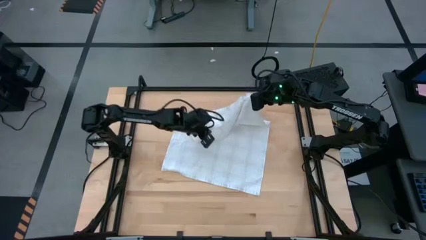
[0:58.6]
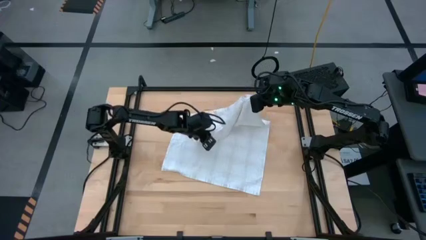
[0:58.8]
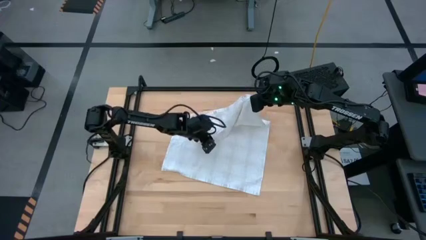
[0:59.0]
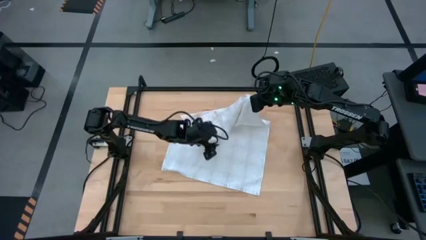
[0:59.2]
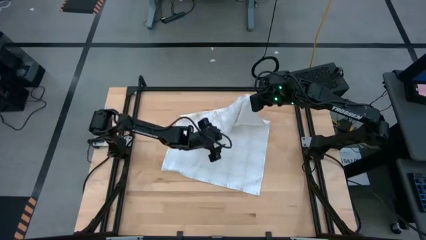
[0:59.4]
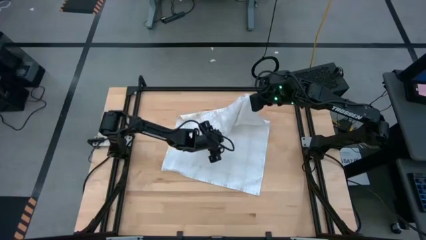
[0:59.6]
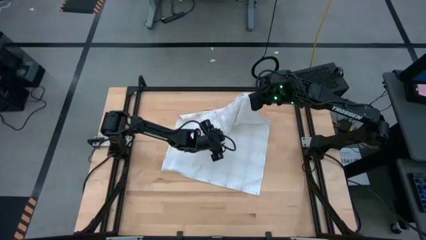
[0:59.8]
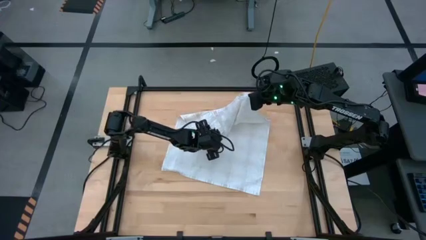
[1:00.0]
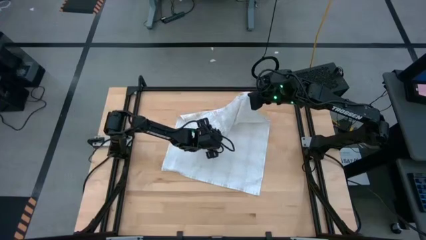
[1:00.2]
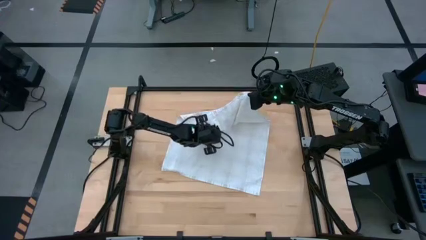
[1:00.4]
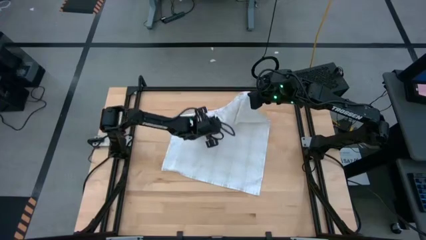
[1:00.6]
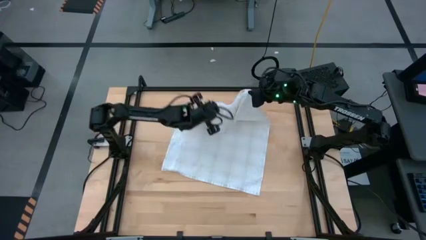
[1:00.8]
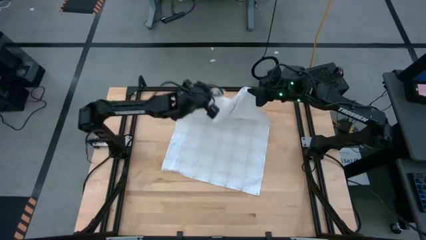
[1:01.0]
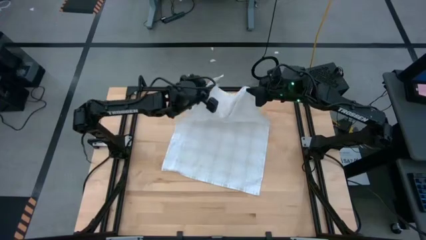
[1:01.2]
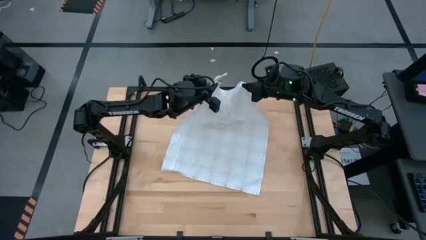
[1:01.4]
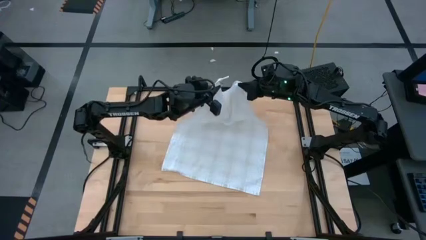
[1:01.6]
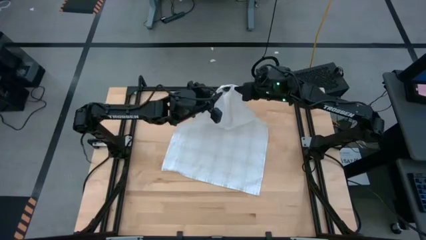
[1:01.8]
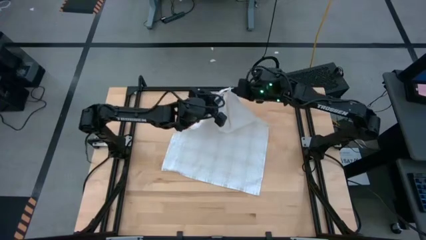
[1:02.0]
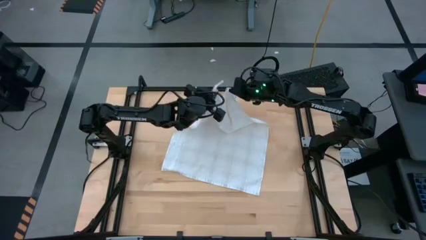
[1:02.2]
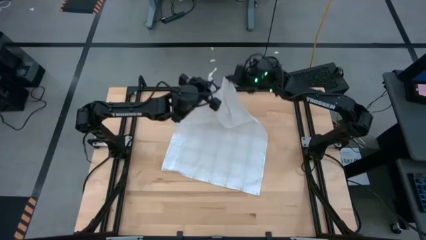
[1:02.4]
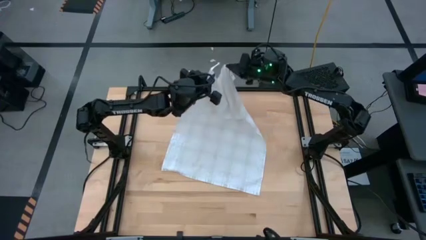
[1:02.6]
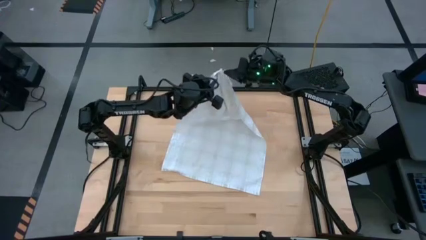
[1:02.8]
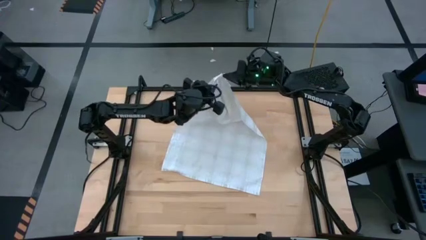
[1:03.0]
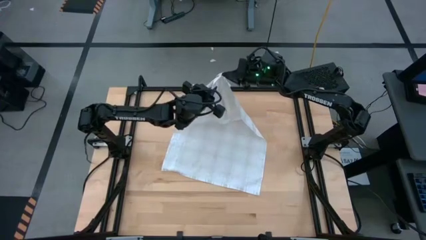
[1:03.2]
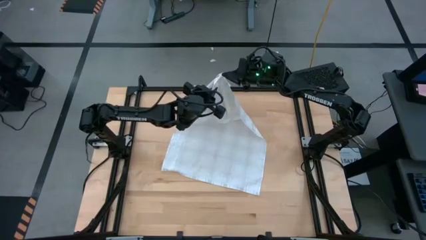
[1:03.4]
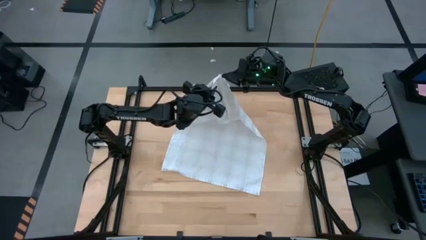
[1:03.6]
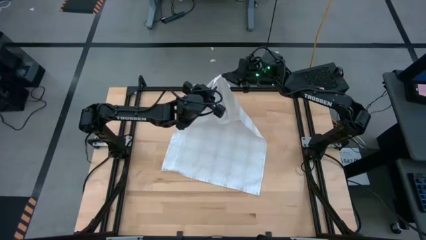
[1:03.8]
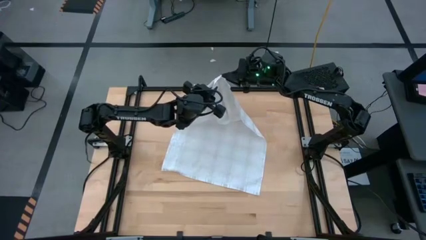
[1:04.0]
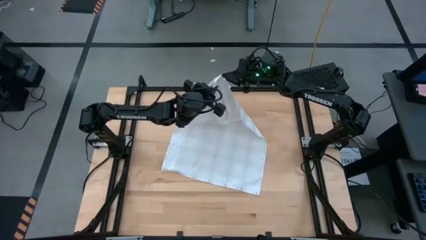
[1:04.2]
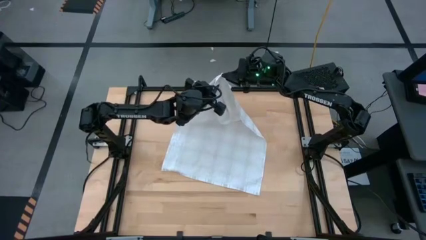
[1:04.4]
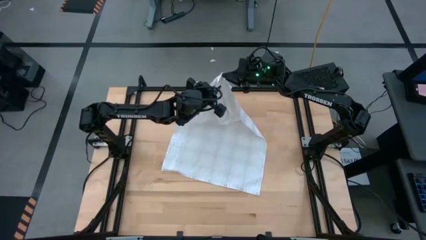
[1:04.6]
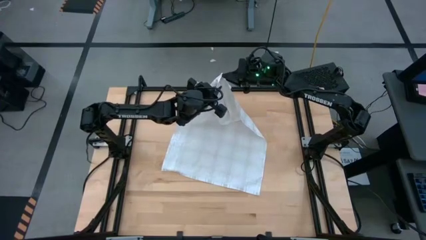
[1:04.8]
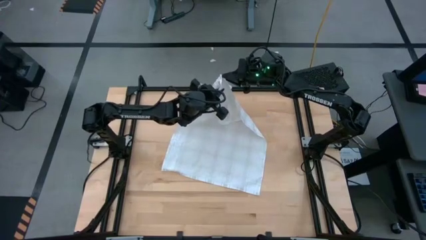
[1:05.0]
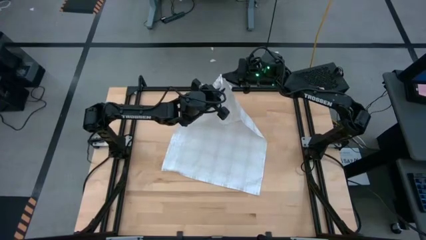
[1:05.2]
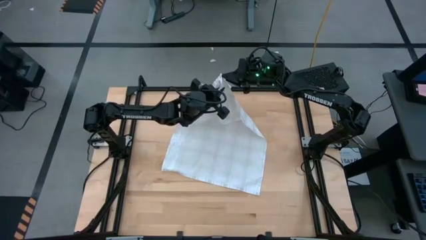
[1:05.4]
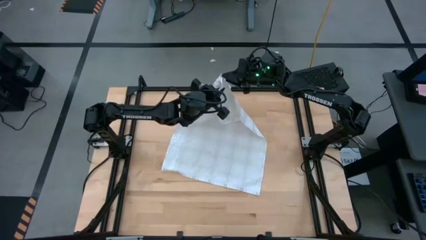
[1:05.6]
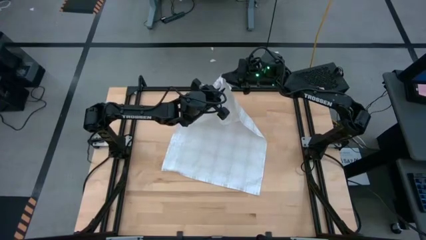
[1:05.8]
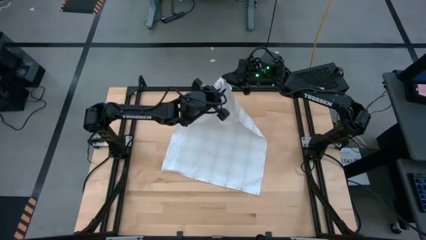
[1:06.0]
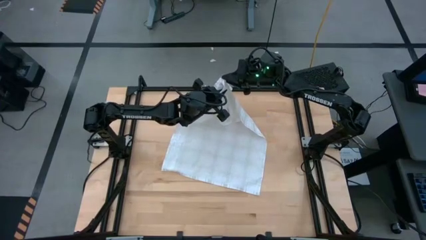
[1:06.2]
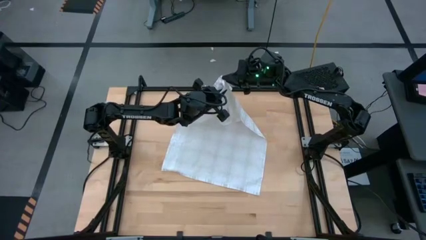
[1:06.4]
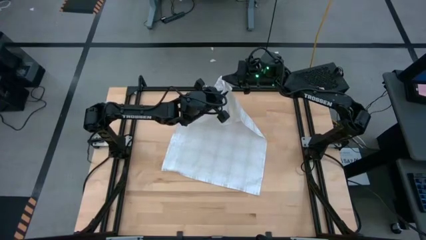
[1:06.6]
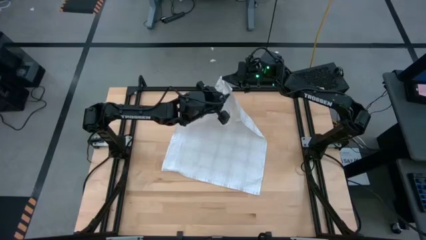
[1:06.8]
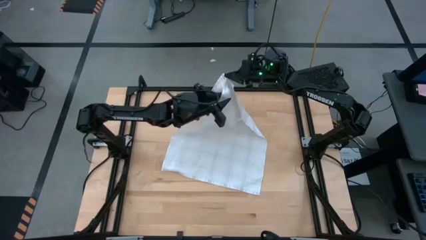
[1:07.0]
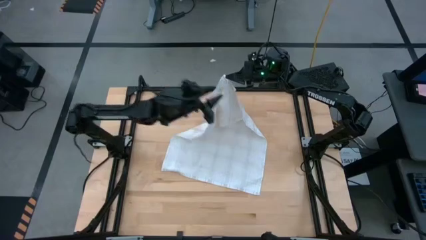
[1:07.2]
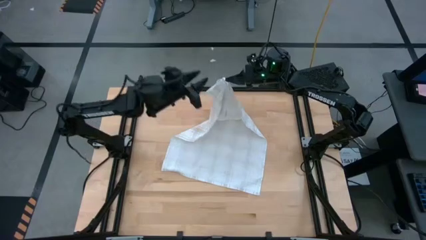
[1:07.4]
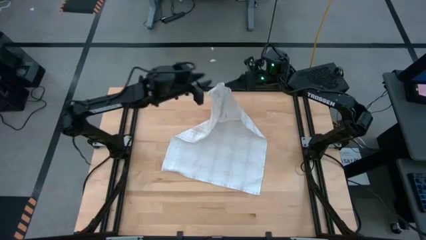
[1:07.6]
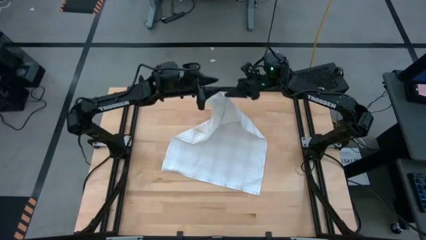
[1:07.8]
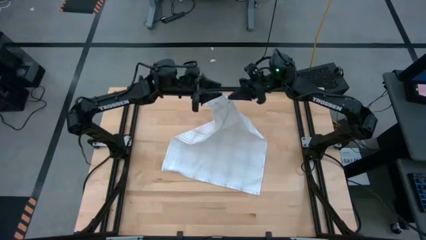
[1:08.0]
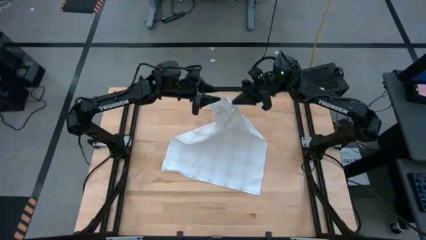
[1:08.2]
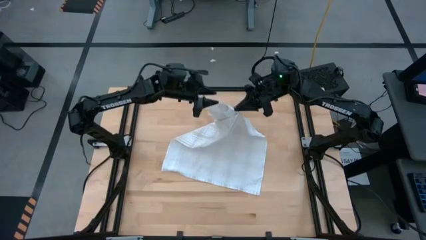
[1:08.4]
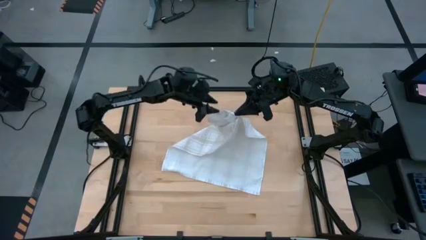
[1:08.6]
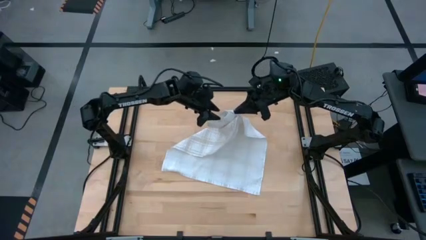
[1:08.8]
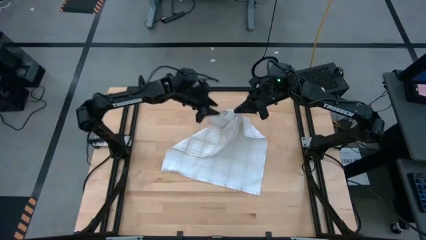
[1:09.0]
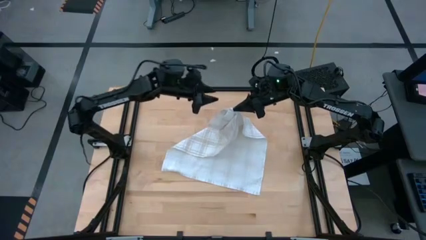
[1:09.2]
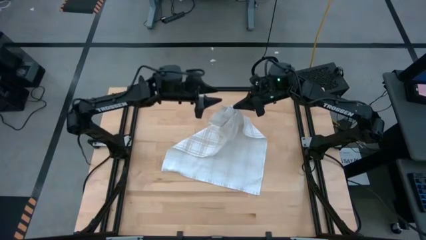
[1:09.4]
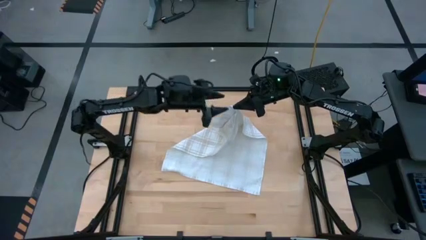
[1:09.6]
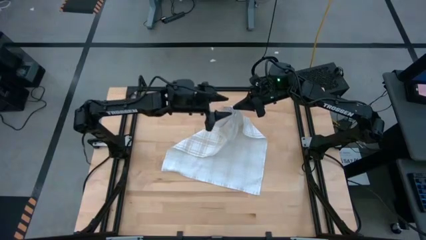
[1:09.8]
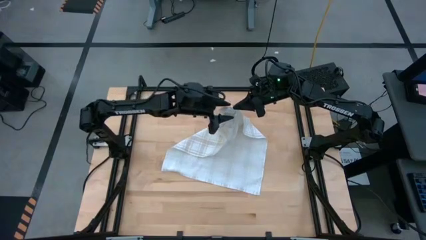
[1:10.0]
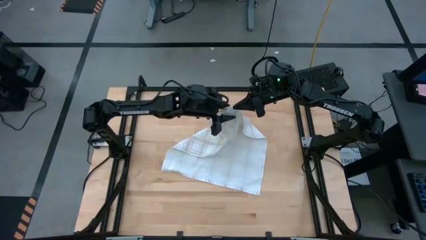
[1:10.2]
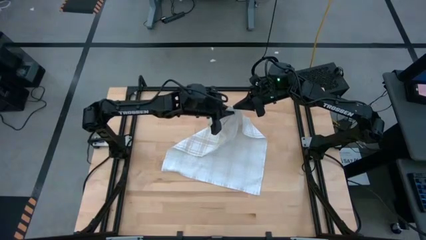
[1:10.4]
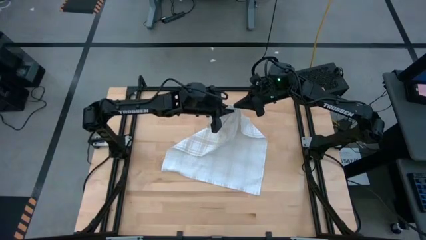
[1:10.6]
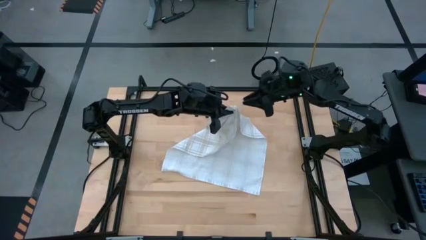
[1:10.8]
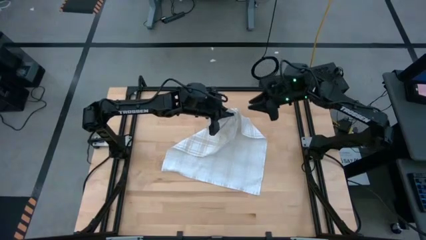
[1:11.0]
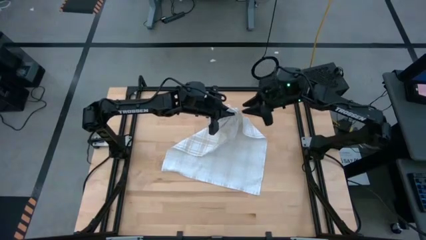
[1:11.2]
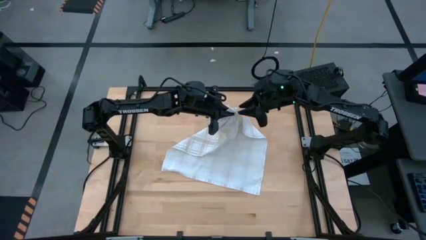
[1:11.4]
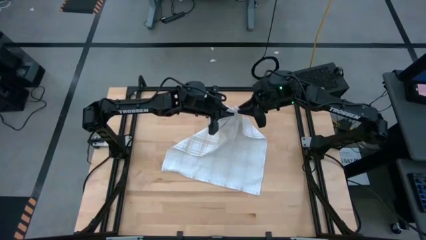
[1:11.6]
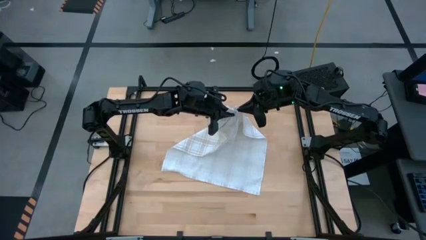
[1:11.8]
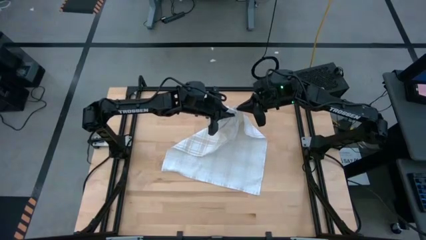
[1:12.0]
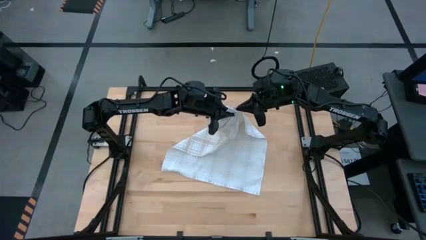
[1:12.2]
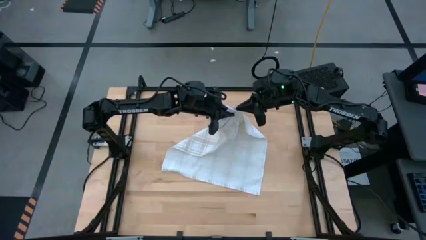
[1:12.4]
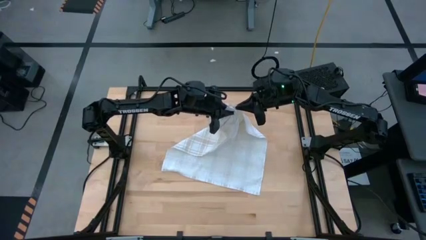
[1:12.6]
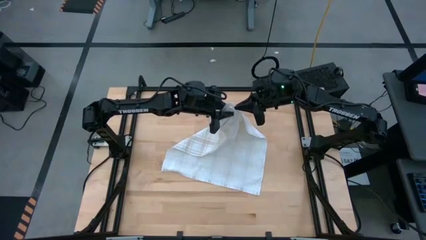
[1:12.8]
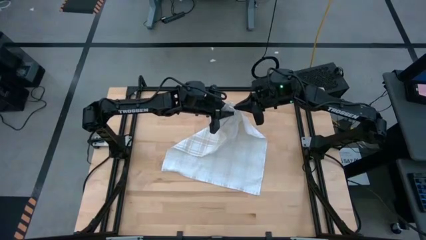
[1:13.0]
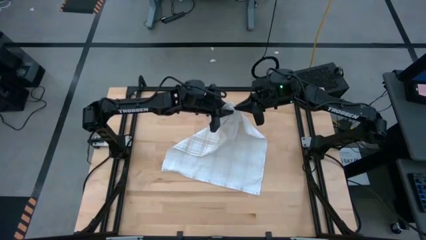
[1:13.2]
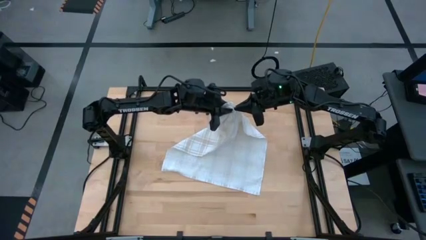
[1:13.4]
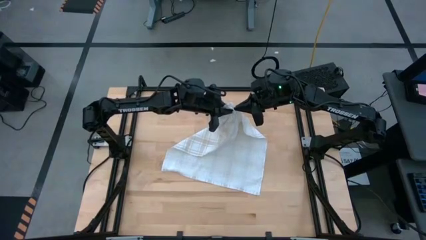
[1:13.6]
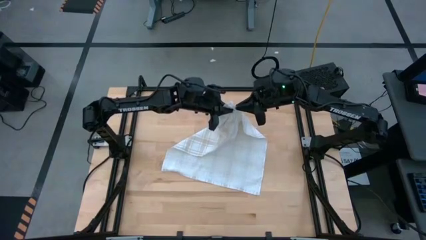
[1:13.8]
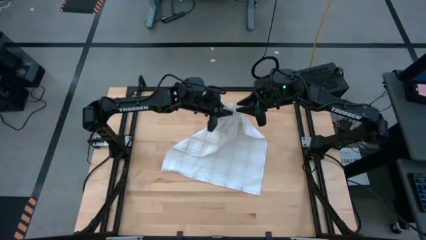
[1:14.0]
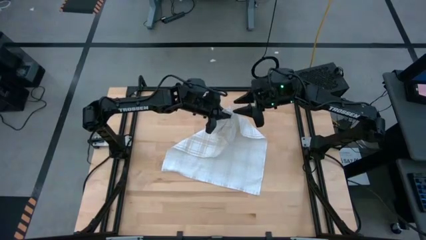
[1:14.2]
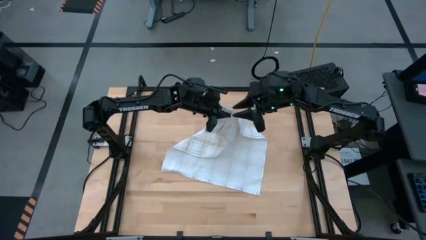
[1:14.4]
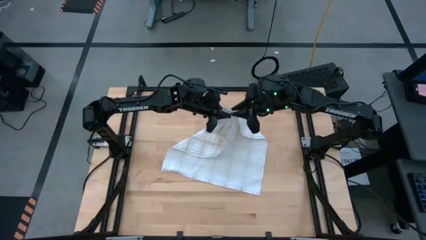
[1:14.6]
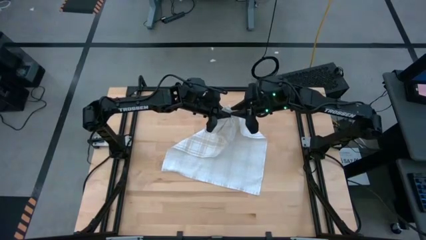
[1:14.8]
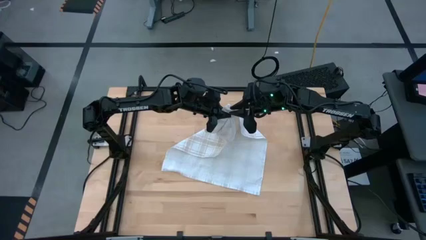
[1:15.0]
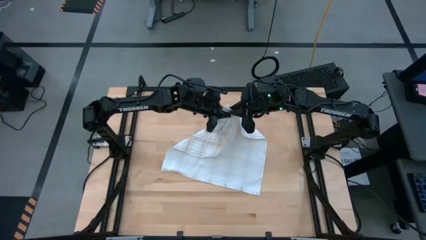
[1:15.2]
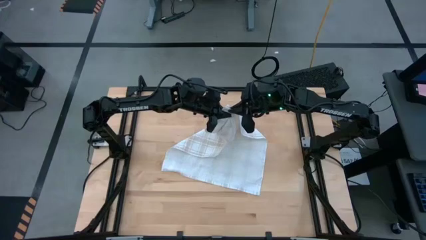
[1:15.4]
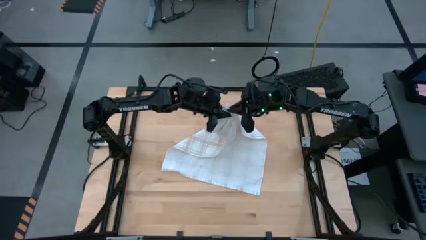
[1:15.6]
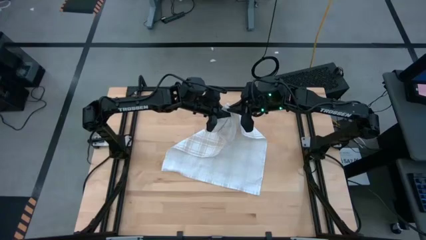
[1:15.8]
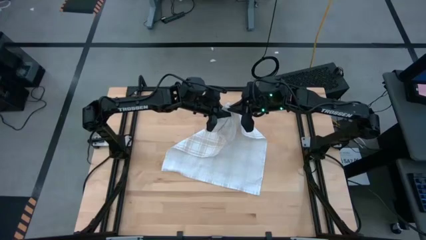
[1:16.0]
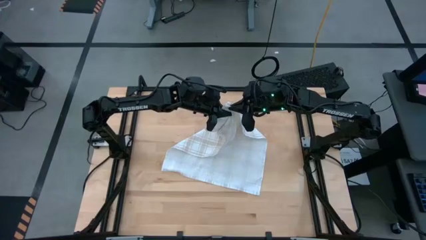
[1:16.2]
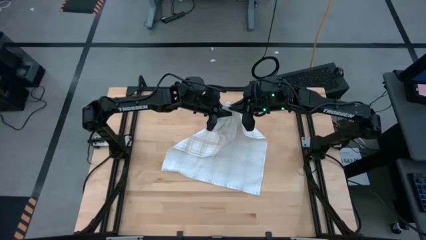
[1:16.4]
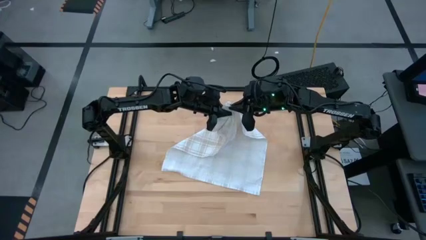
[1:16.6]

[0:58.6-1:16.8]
Task: Roll towel into tight, uniform cylinder
Roll the white towel
